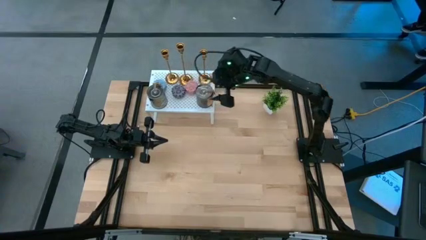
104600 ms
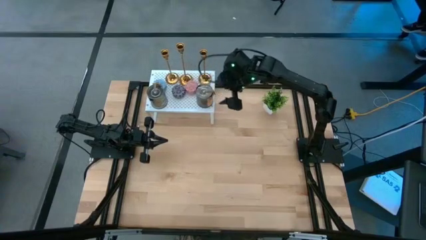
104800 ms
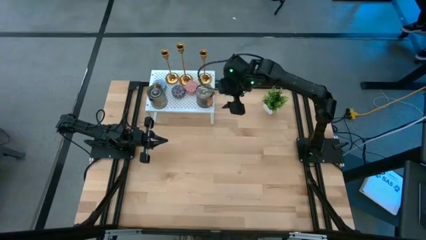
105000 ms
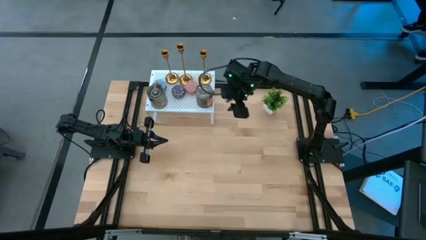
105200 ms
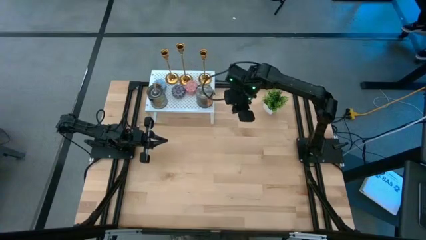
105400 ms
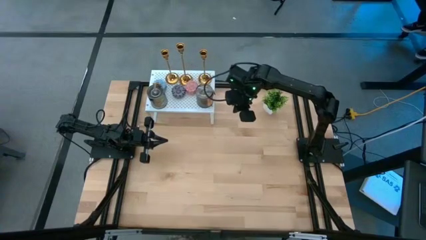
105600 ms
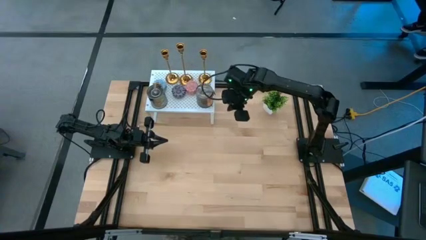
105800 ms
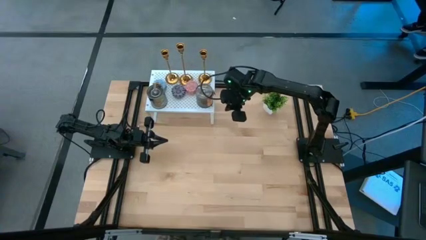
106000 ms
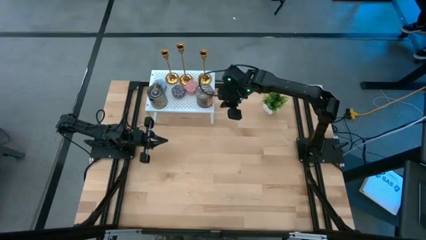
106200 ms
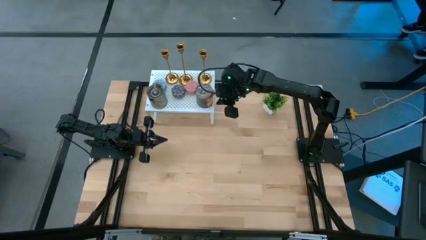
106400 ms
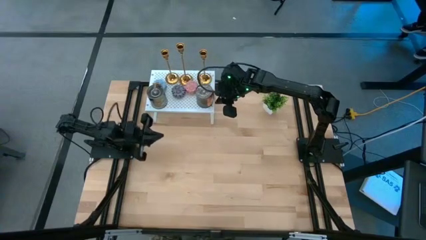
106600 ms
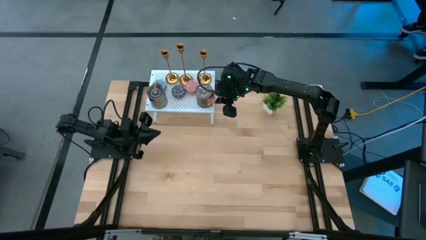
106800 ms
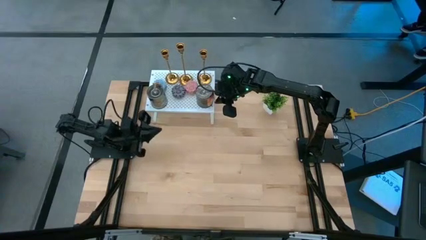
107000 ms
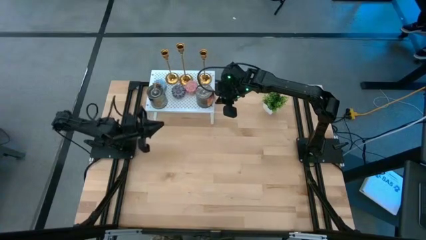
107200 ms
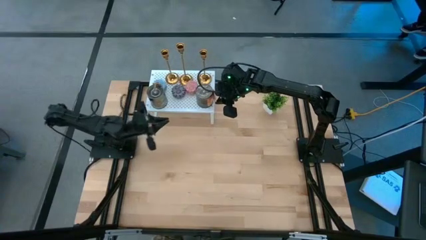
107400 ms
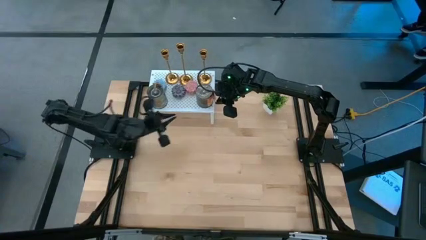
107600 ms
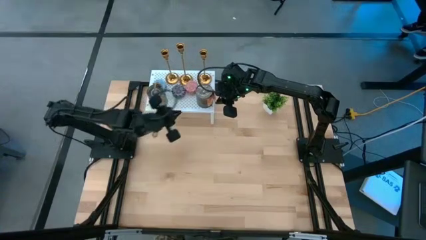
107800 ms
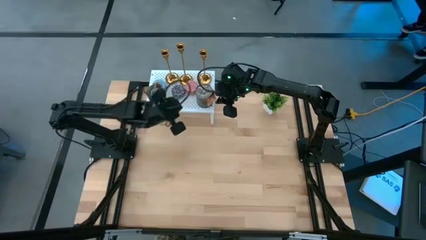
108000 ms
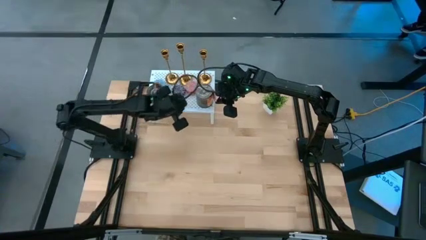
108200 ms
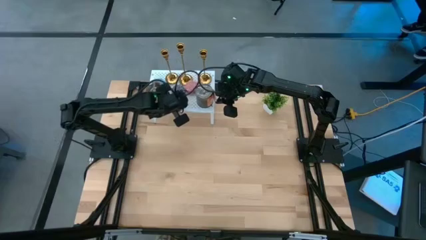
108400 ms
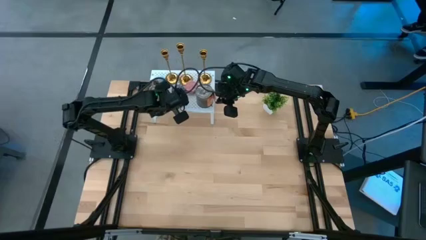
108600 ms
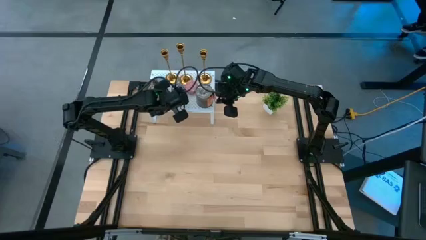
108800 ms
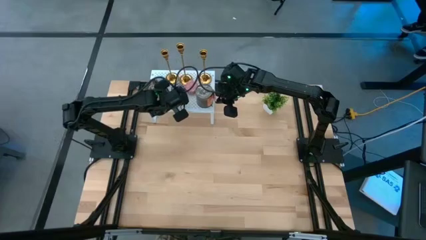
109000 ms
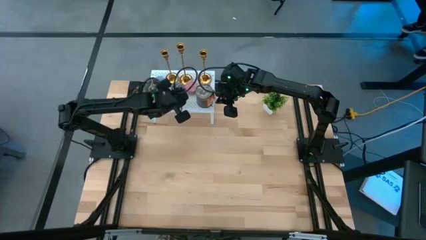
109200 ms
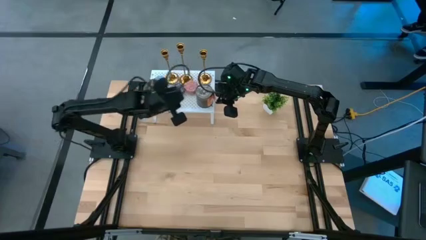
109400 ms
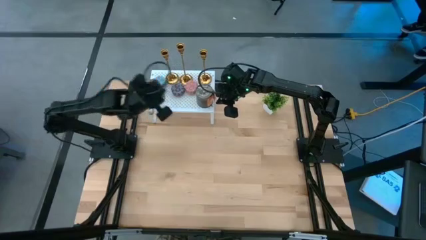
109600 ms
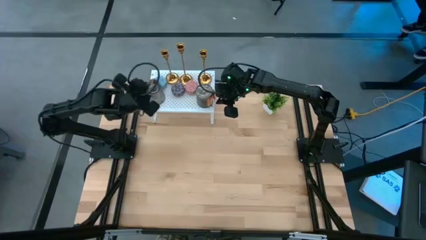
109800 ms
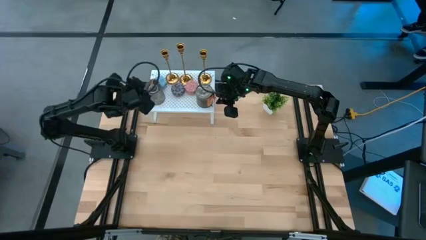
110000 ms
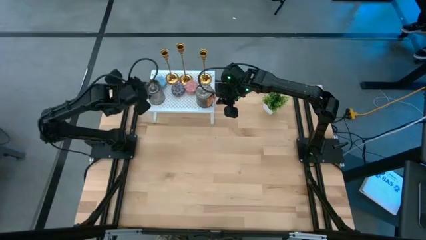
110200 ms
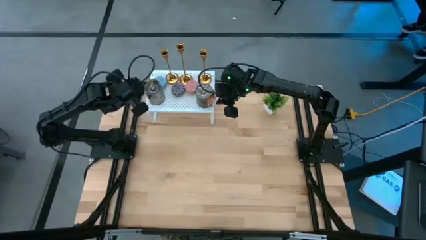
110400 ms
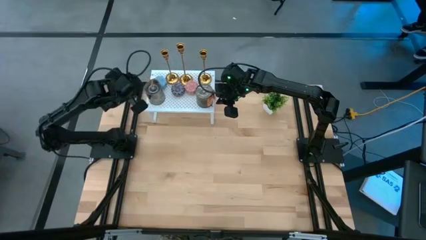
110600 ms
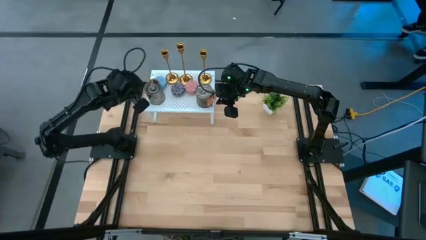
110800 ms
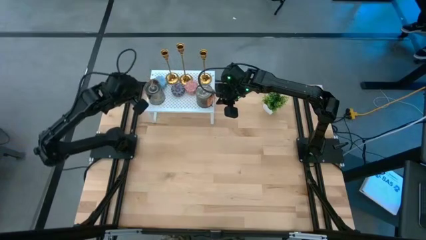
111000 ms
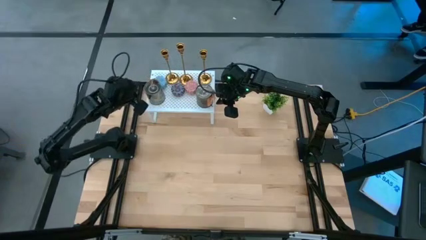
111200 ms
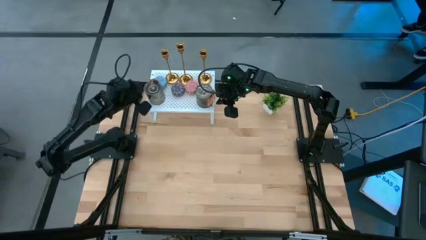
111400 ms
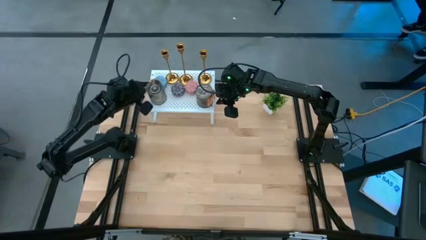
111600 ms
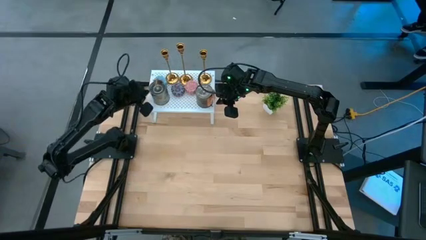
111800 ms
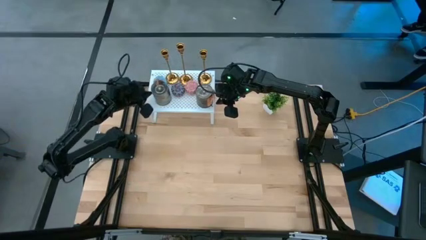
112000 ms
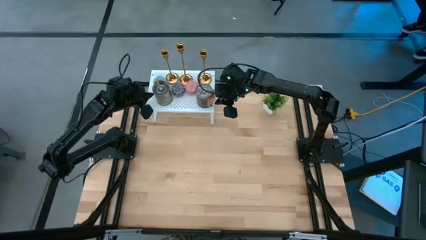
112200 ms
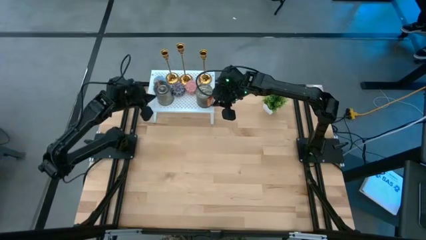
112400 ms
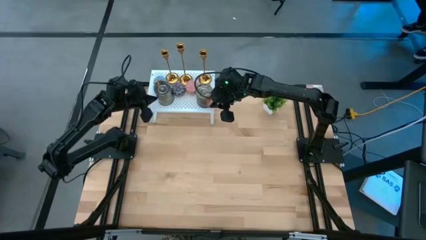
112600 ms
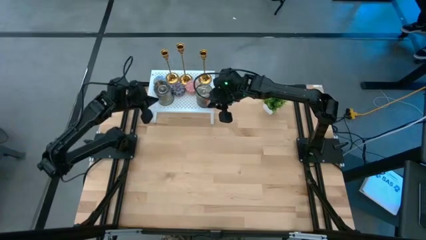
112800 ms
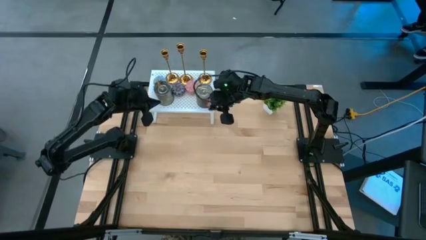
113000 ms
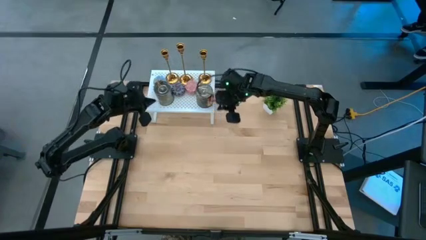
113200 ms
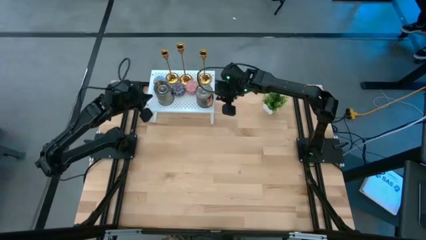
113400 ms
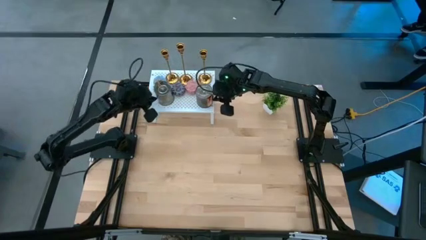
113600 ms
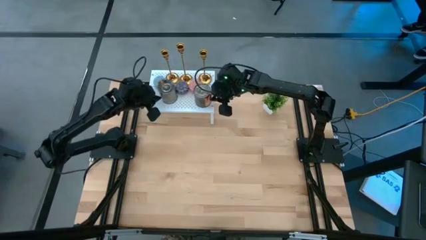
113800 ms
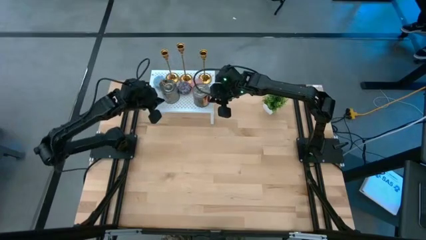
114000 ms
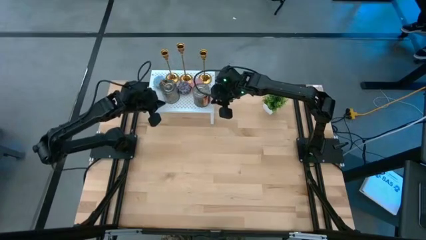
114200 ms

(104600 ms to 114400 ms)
Task: Pick & Place candle stick holders
Adjust the scented candles on the shelf

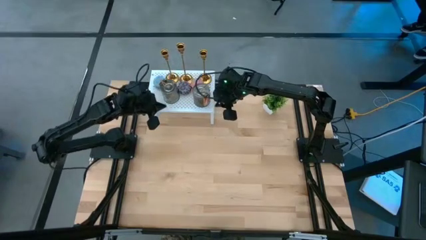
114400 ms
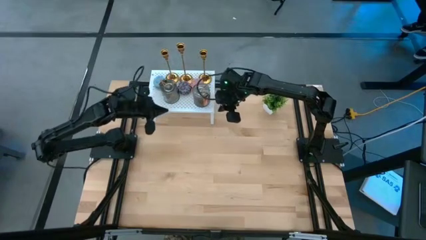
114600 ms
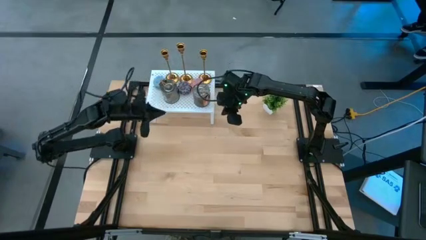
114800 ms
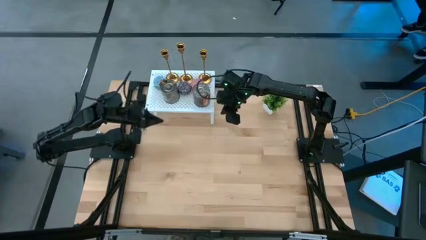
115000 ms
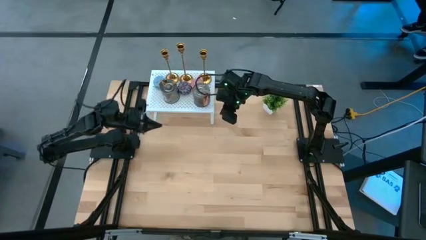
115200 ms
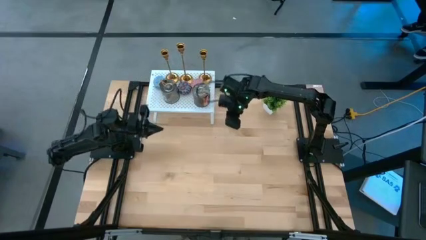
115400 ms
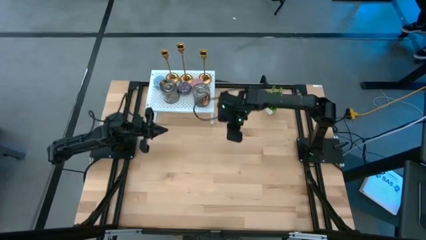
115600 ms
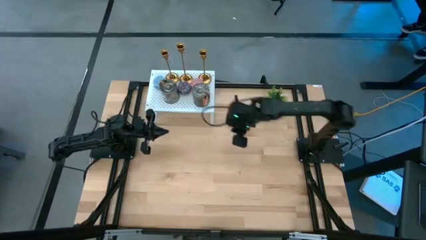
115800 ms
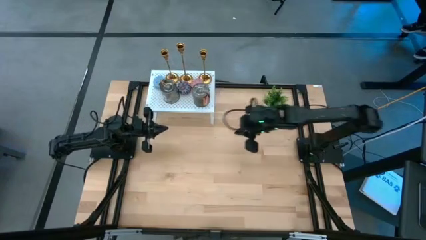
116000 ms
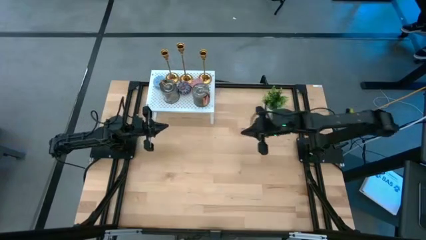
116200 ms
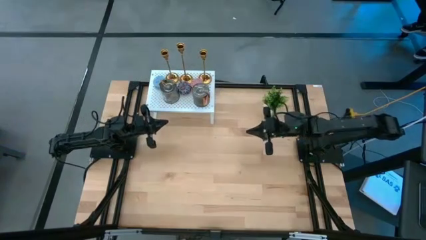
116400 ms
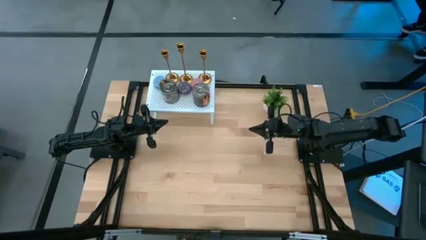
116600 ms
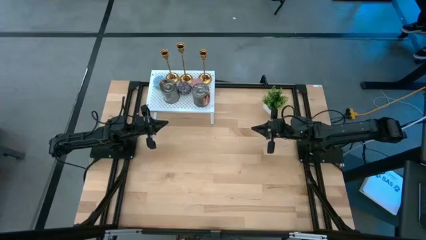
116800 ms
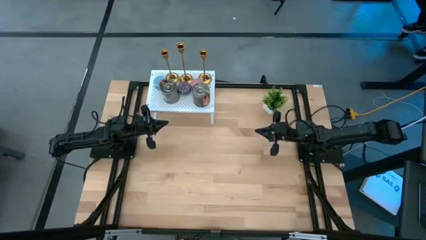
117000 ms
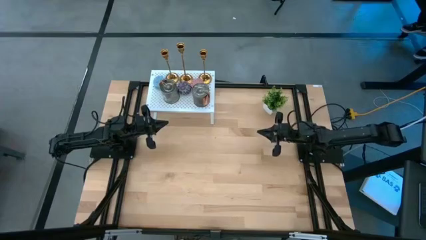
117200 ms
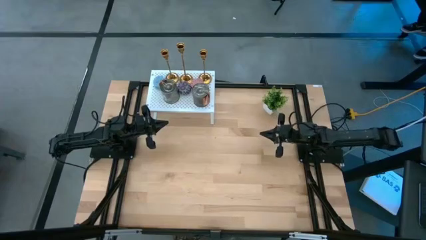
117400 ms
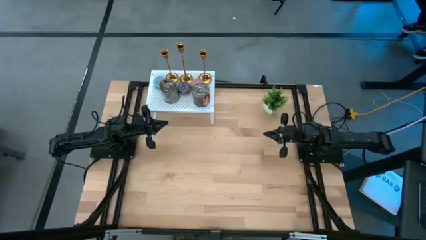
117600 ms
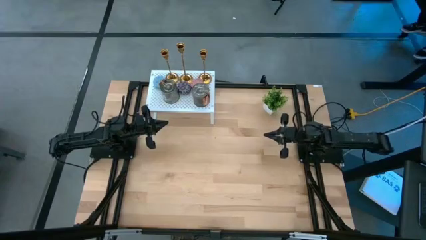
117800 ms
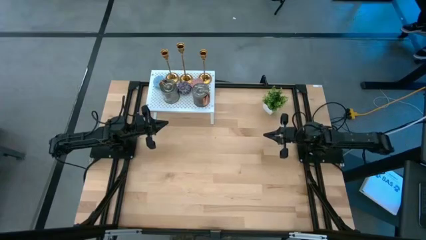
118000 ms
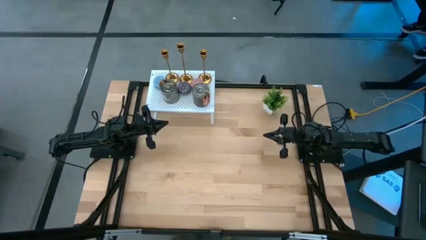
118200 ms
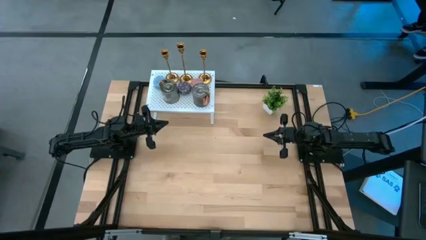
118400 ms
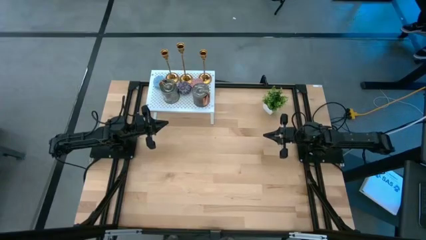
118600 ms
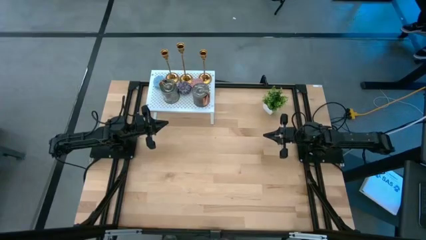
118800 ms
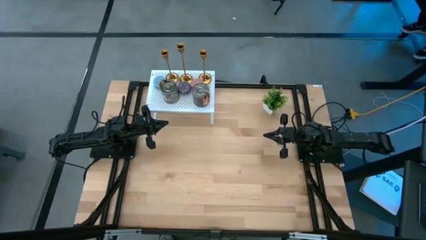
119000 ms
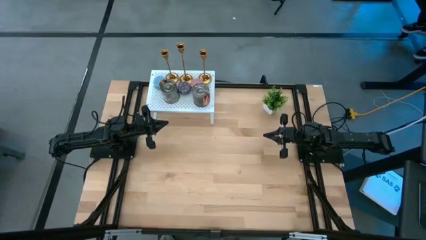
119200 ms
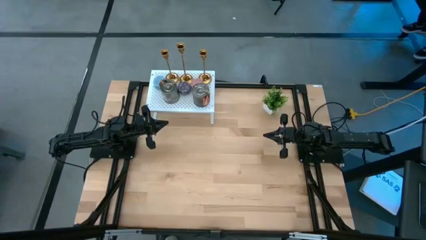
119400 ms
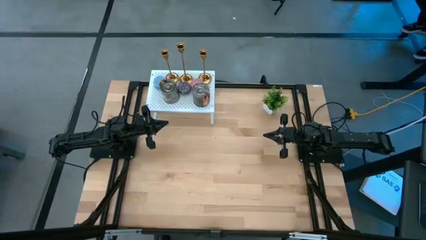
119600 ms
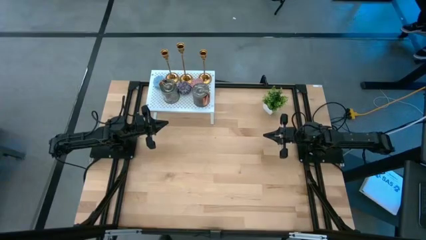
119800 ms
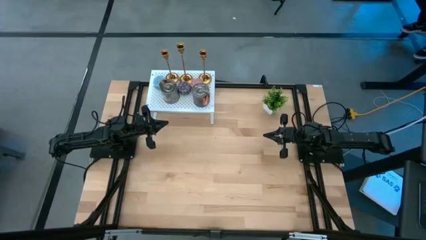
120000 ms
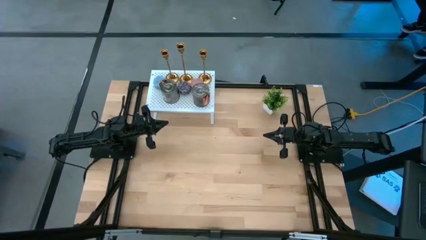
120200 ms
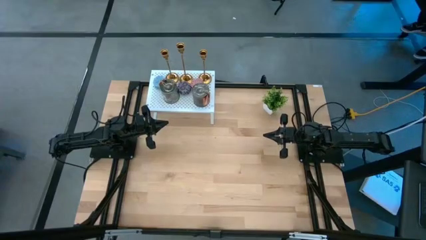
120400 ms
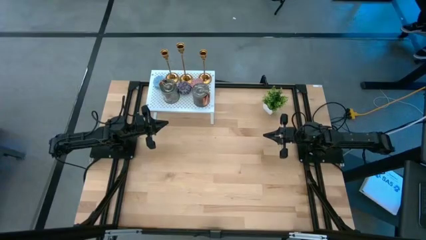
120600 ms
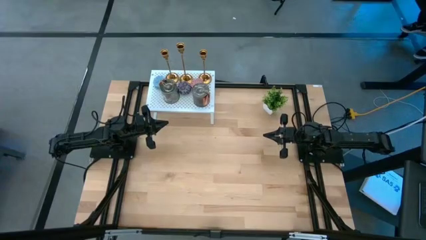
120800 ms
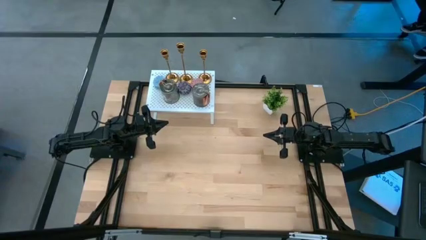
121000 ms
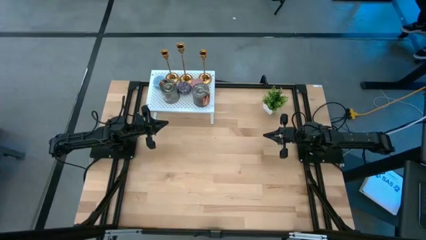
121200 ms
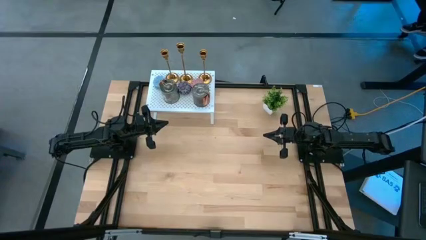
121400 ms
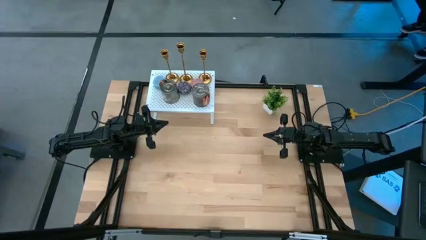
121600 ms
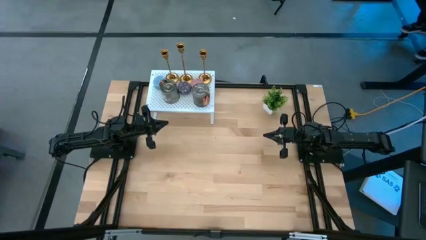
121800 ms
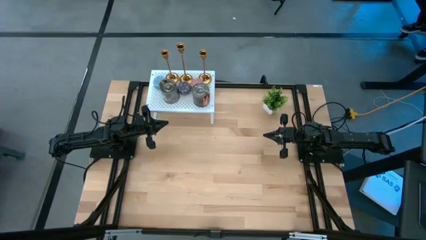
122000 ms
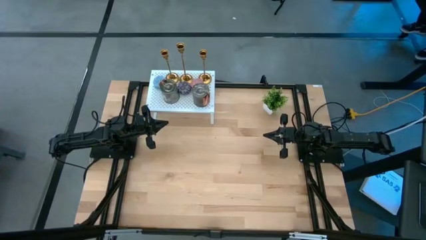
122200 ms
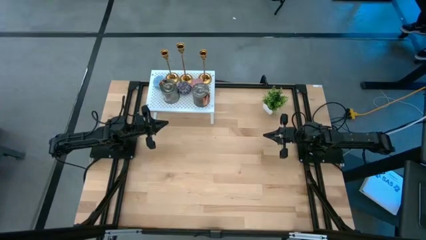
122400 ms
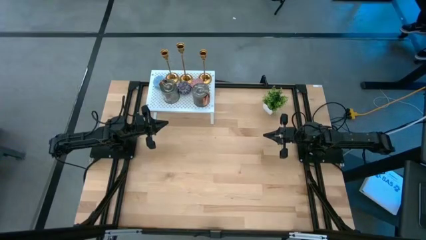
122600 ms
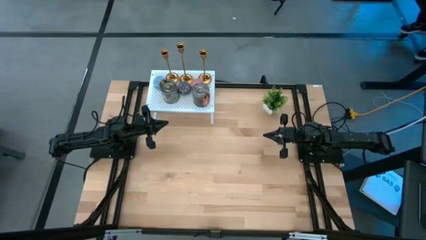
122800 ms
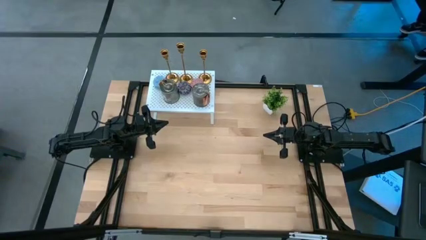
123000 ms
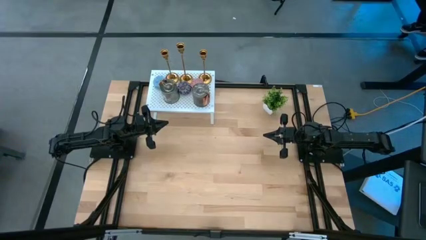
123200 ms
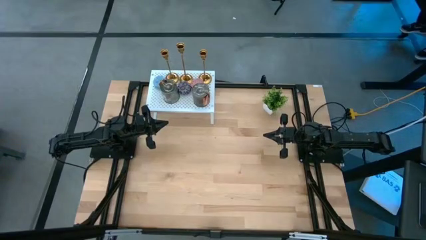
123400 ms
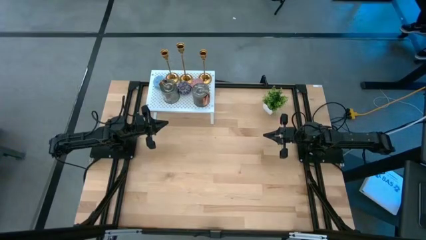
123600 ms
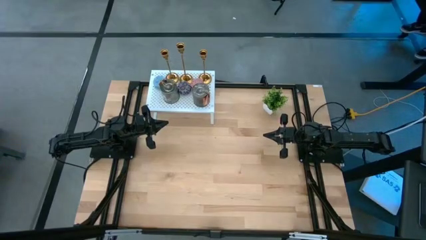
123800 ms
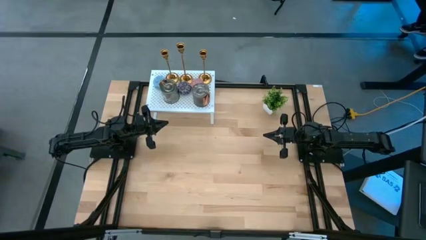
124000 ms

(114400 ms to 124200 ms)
Return to Home Position
